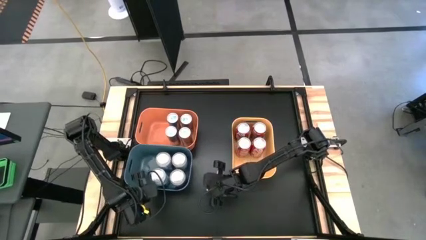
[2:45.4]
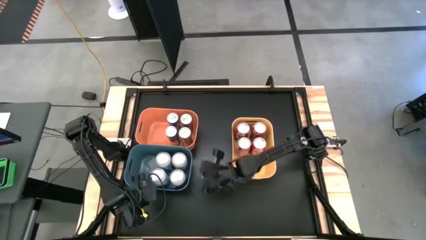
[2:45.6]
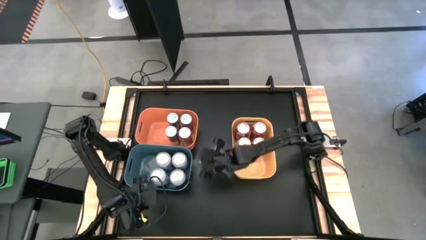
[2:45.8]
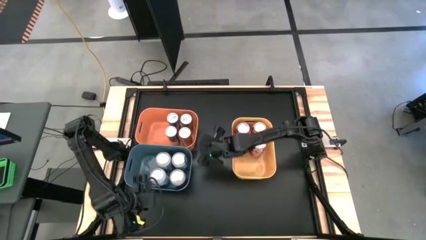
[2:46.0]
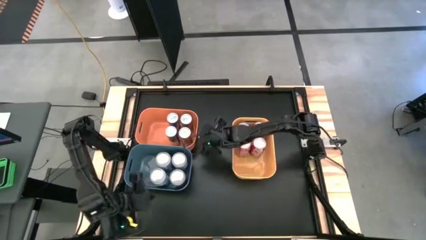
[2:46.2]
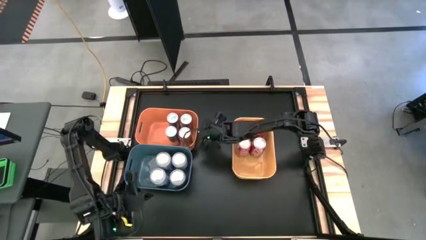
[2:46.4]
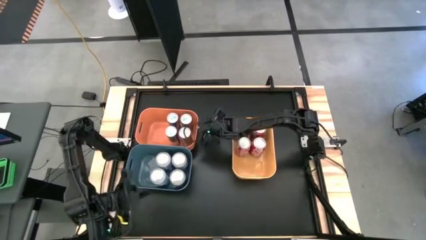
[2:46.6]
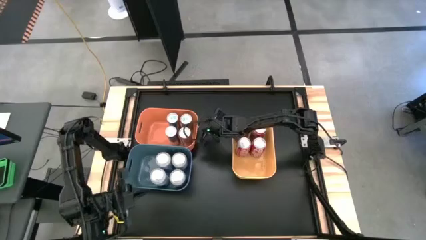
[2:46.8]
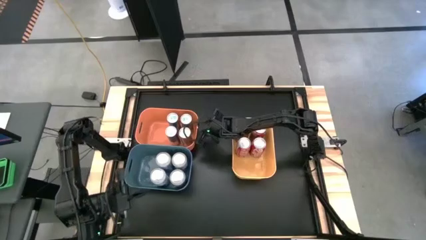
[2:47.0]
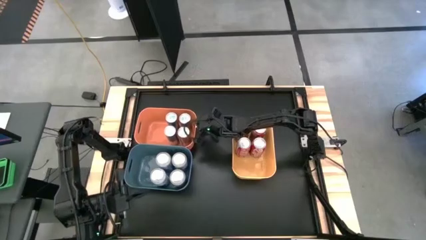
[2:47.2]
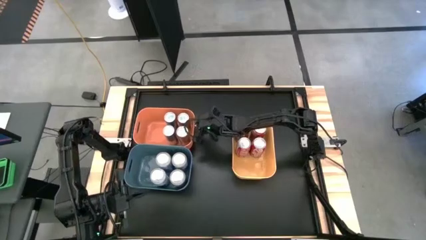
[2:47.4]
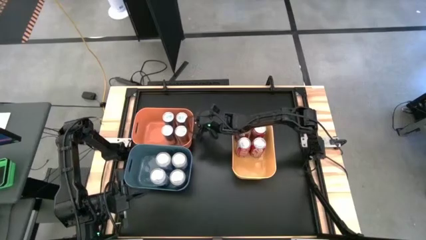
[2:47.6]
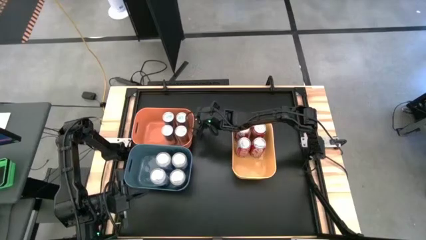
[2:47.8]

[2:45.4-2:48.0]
Task: Sort soda cans
Adjust the orange bin on the table

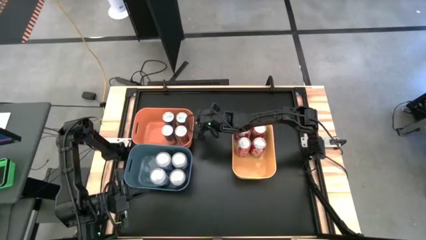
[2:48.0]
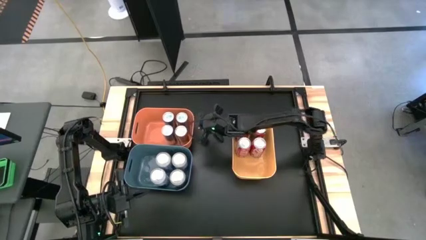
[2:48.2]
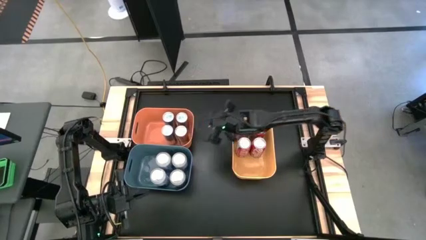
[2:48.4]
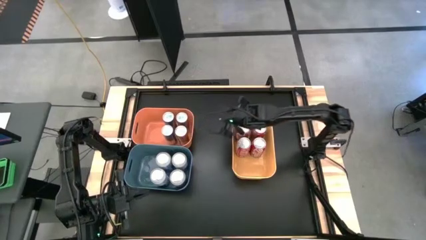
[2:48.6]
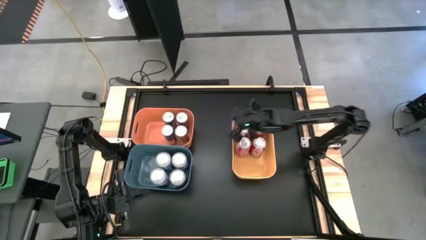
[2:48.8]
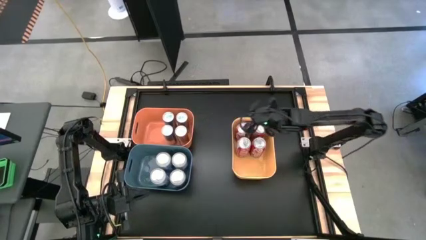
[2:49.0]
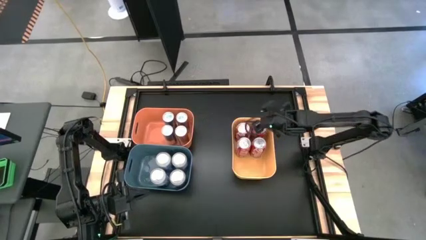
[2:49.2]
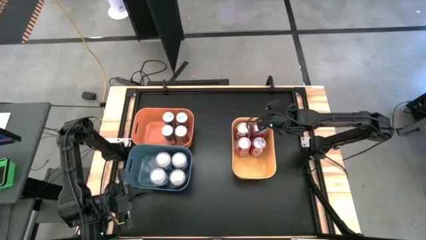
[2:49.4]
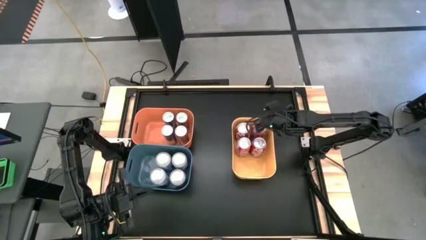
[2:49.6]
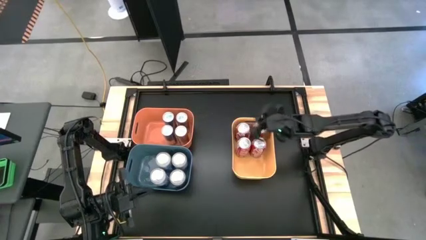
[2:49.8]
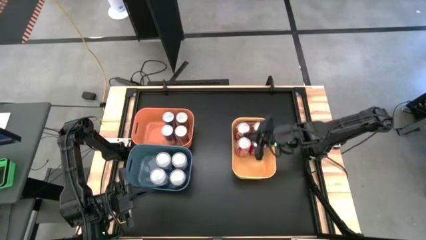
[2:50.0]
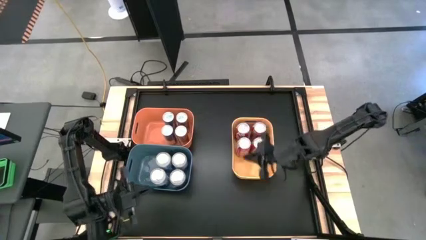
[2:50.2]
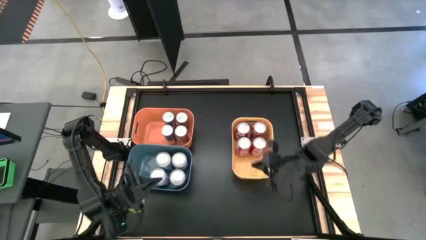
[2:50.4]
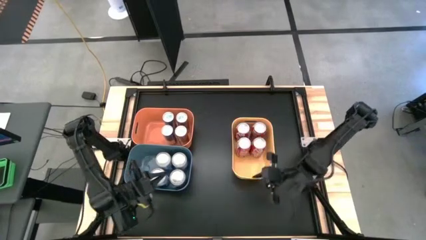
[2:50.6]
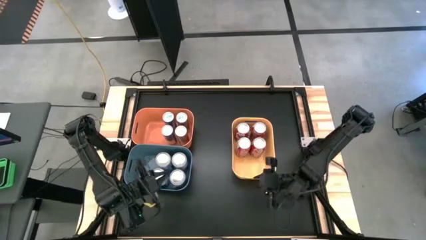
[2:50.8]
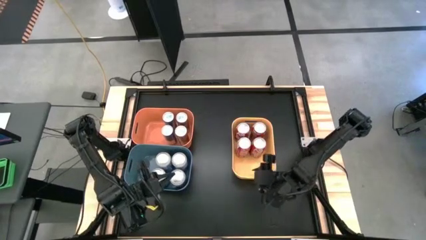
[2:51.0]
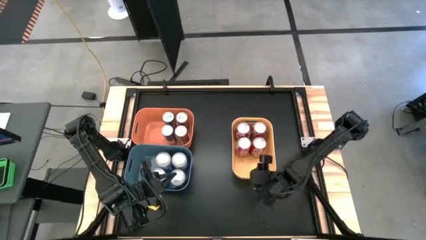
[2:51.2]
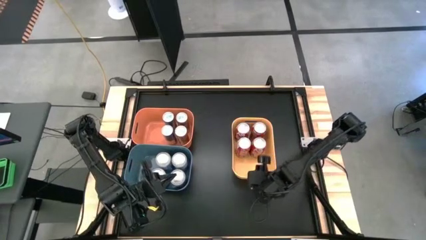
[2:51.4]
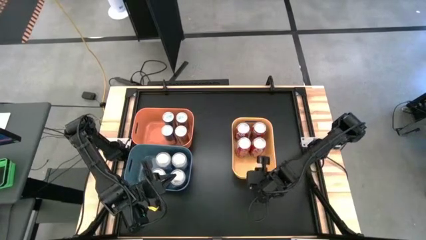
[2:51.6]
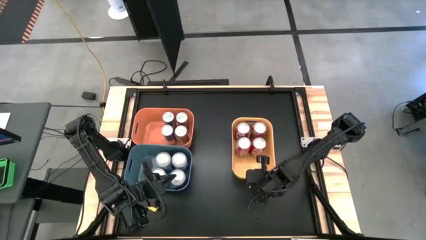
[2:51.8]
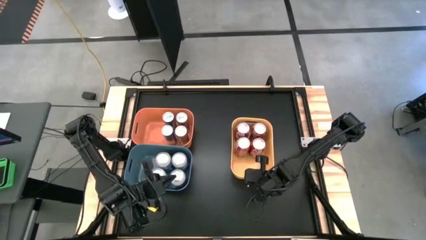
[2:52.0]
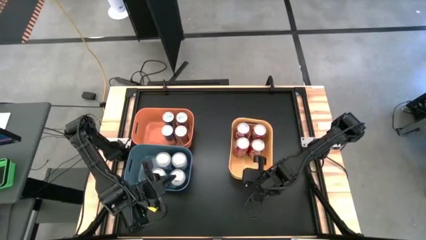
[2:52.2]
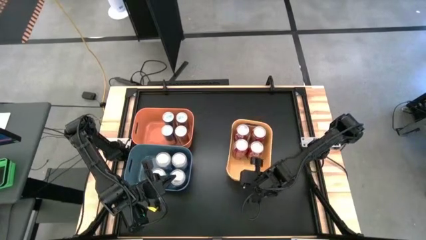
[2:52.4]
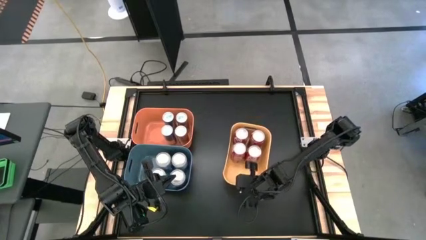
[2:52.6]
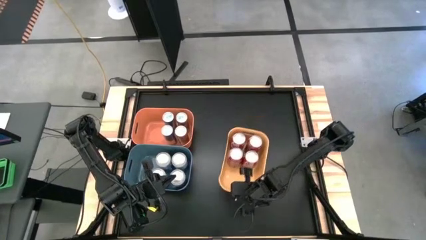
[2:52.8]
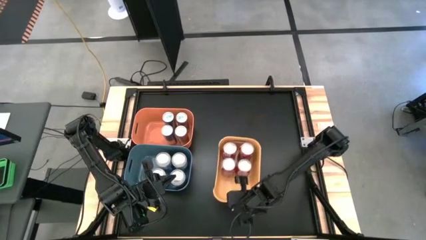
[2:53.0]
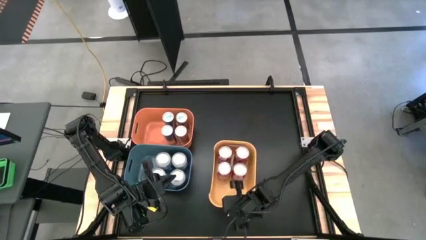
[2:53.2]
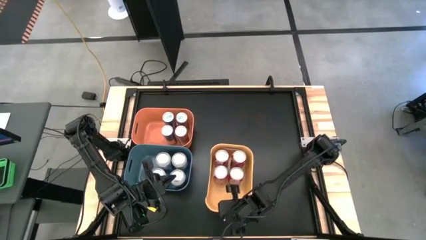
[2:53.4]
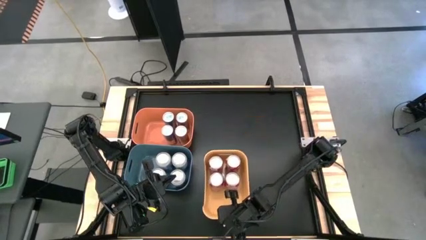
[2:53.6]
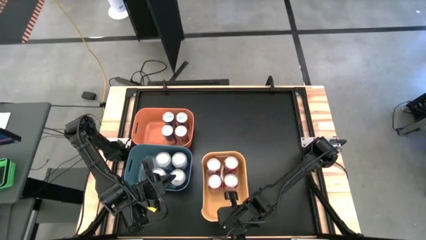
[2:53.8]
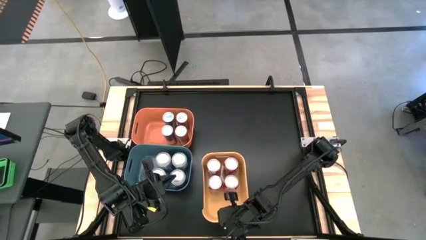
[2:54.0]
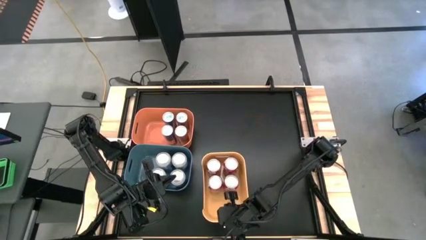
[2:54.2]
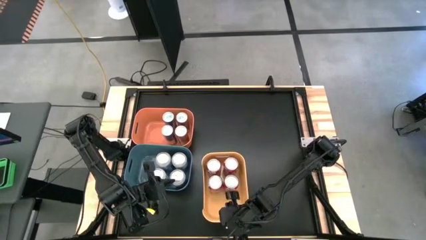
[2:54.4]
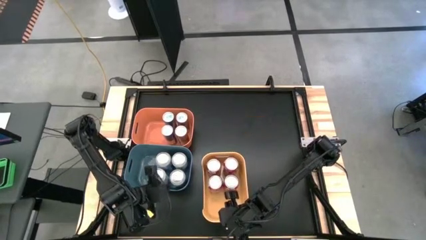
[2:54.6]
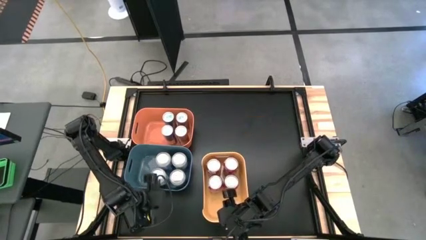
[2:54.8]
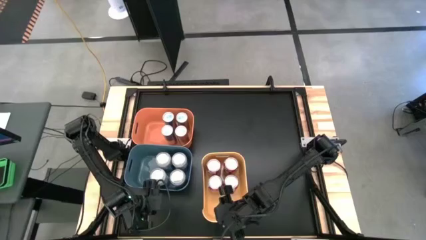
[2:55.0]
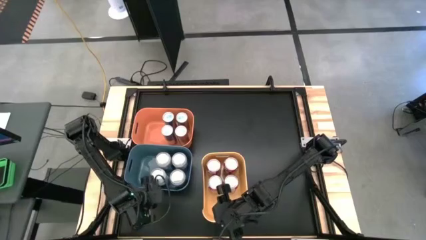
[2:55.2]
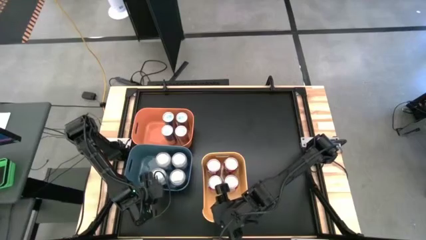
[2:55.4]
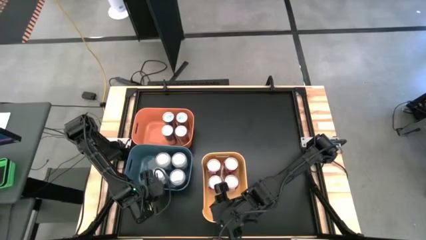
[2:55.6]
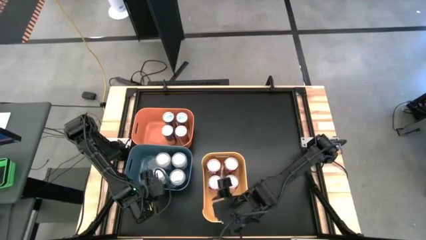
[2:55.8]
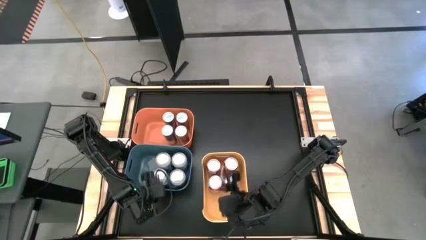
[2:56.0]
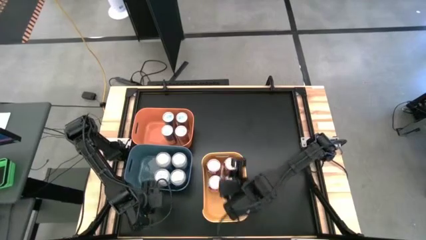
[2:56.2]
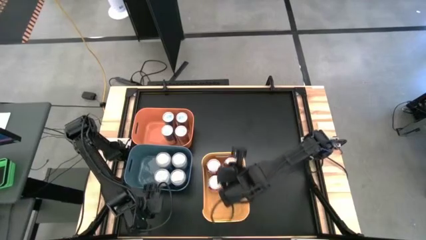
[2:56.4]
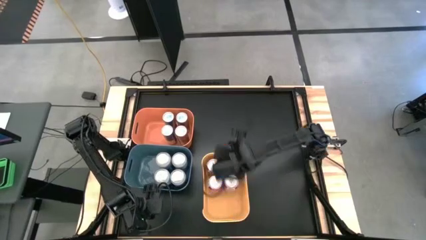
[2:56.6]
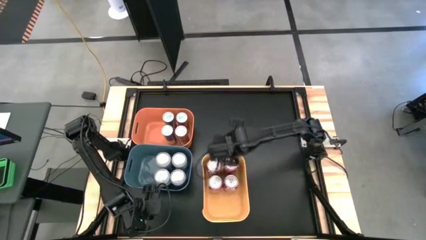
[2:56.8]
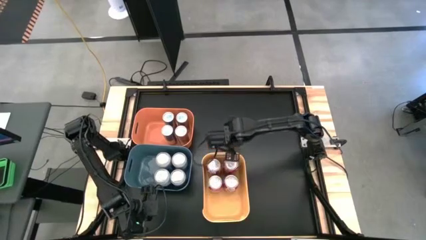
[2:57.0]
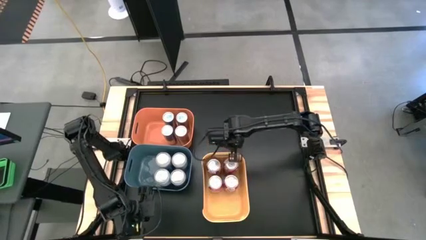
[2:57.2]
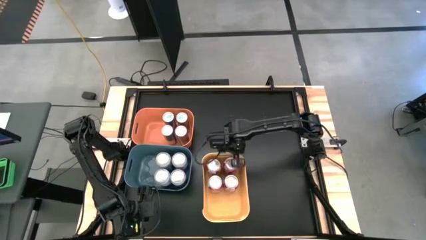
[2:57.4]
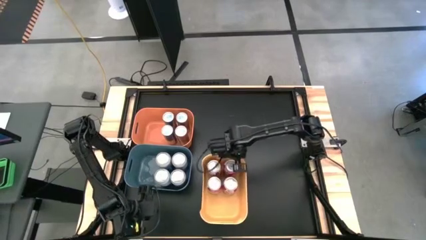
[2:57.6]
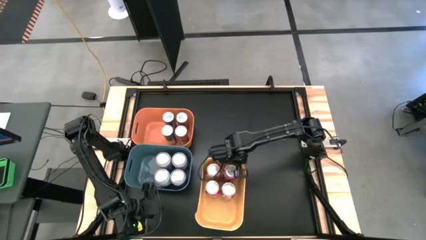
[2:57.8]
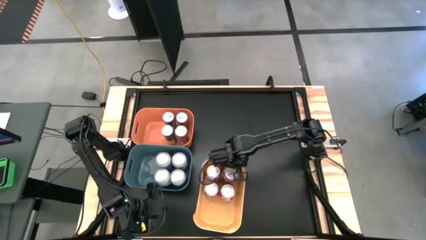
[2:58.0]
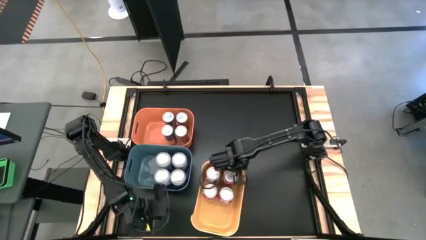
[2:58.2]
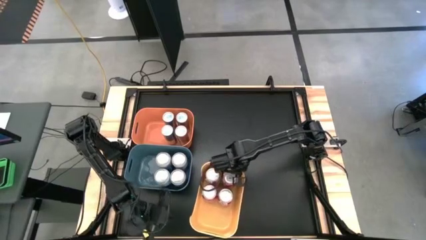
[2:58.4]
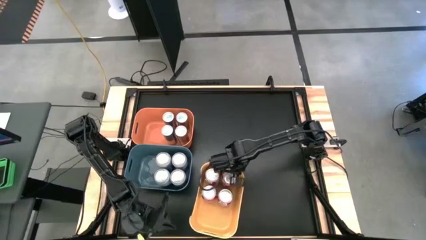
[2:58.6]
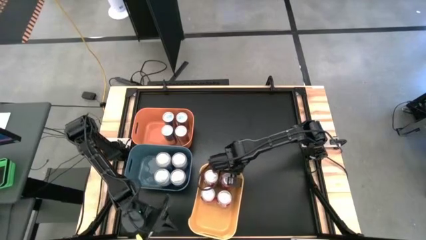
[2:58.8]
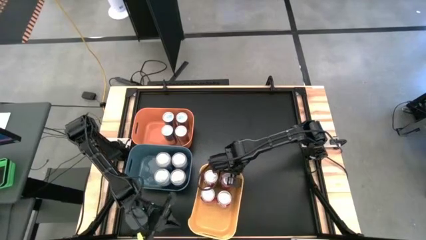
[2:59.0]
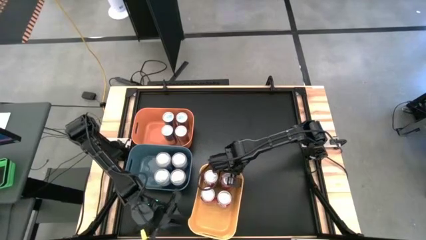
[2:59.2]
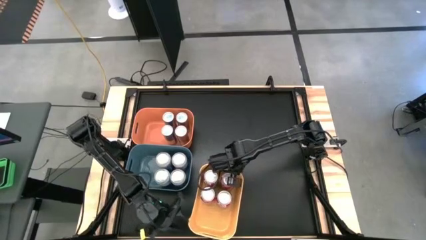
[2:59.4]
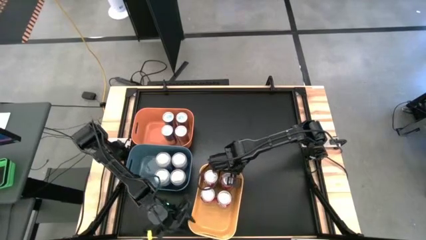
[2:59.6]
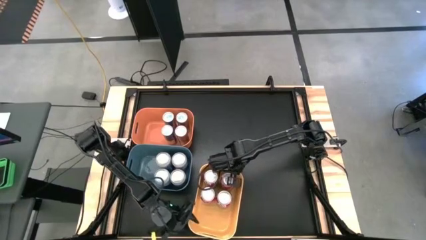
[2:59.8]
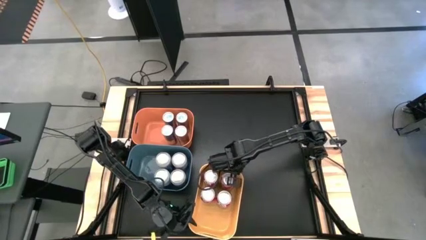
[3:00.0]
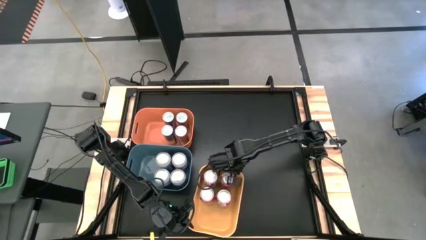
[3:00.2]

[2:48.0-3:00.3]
Move the yellow bin to the bottom left of the table

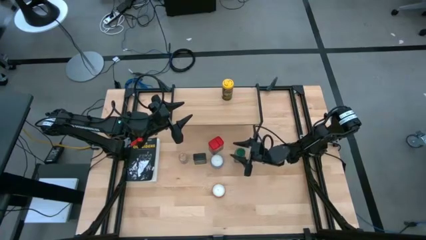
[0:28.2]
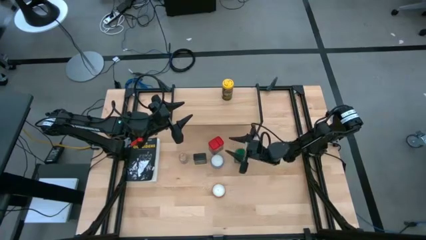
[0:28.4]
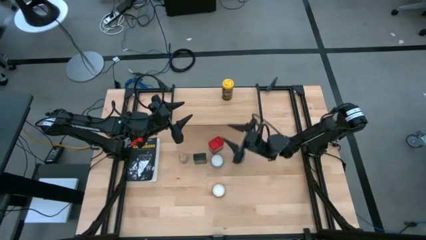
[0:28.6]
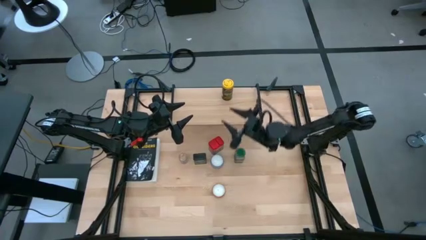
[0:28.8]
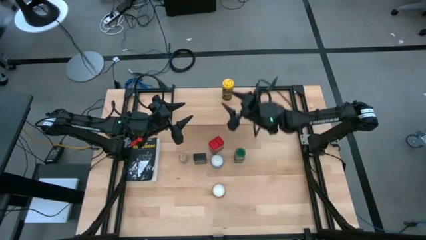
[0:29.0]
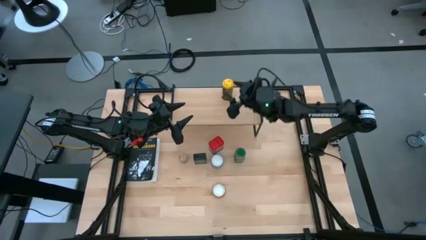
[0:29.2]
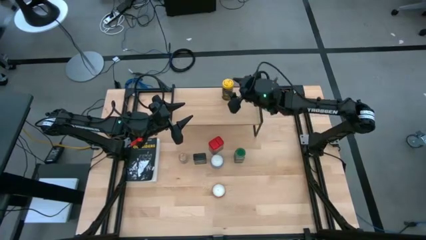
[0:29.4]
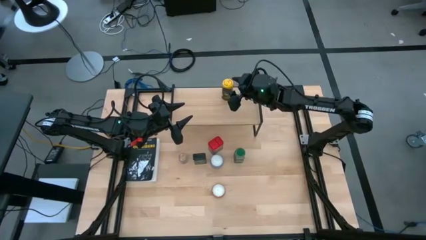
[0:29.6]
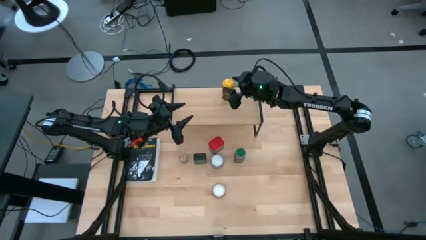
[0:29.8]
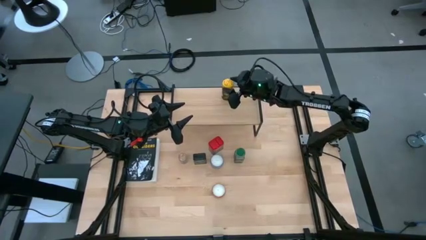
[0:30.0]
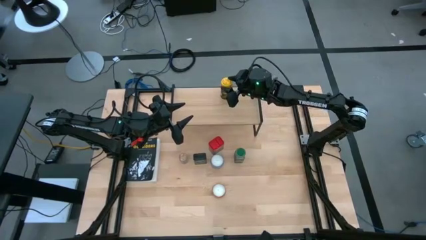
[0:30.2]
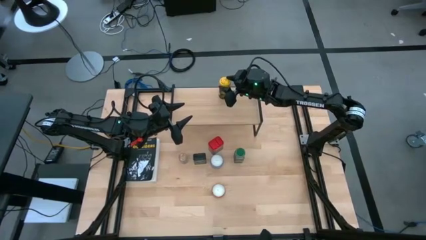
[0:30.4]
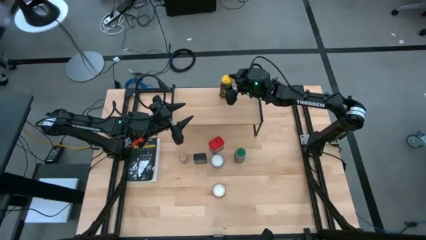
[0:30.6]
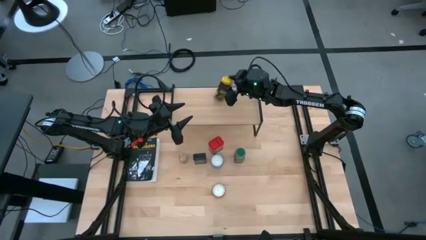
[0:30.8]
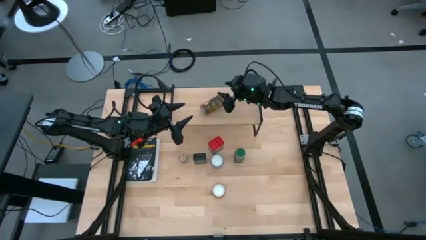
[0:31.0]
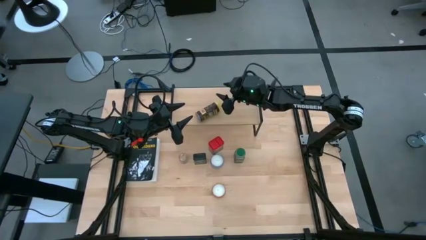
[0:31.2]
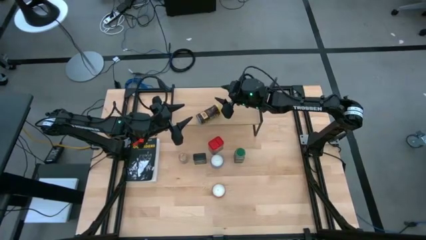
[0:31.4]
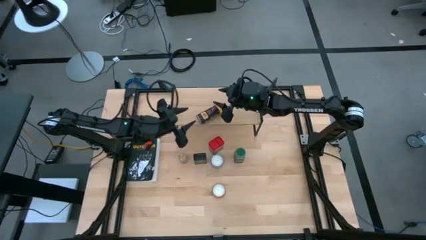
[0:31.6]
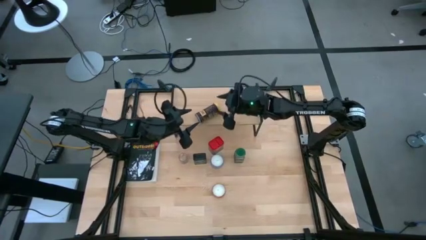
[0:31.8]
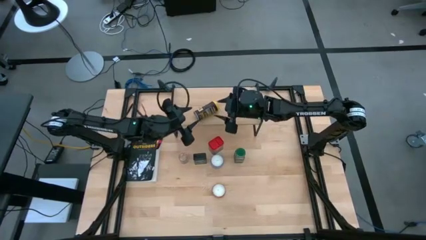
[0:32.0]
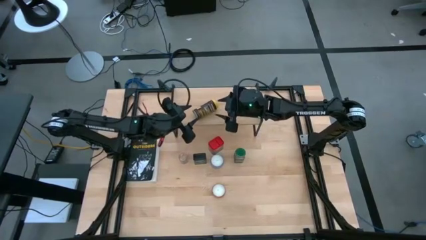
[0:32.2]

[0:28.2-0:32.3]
Task: Shelf spices
Remove the yellow seasoning bottle from the shelf
